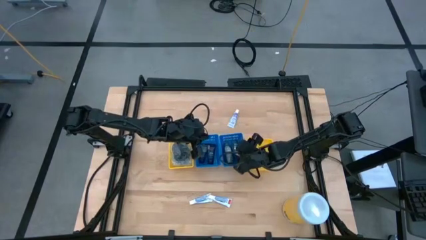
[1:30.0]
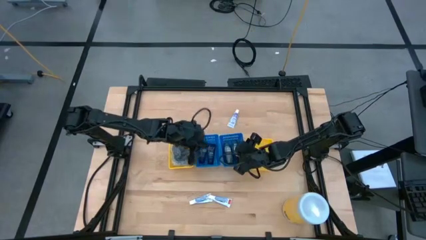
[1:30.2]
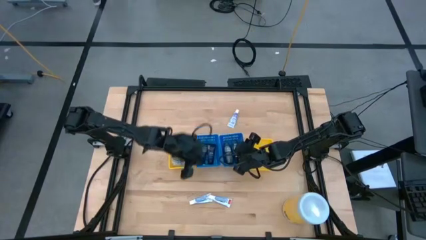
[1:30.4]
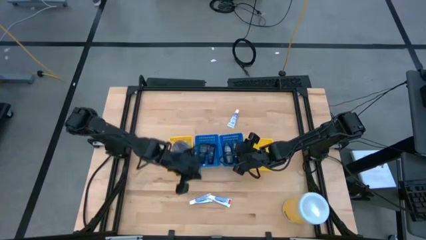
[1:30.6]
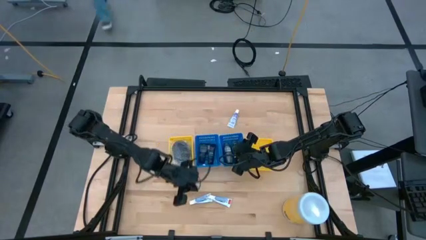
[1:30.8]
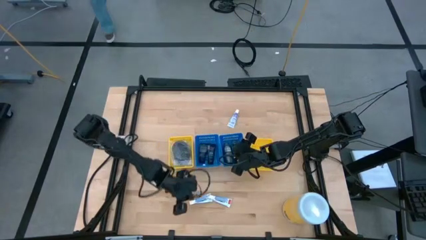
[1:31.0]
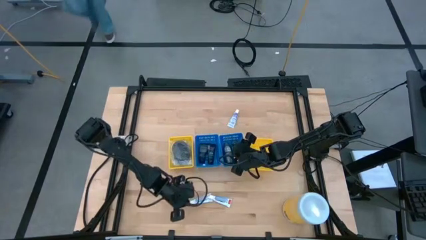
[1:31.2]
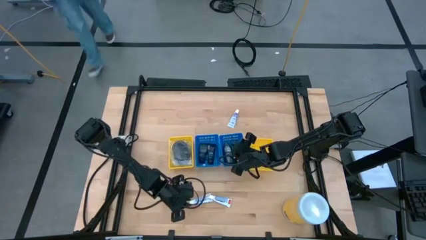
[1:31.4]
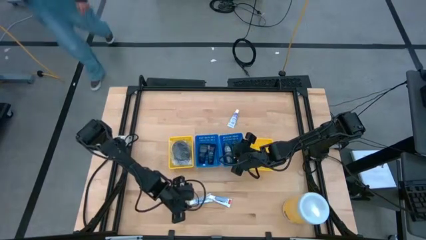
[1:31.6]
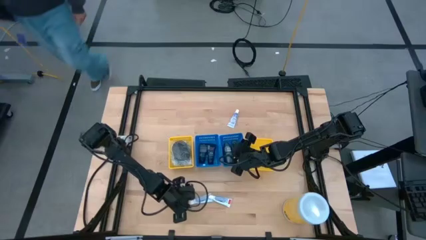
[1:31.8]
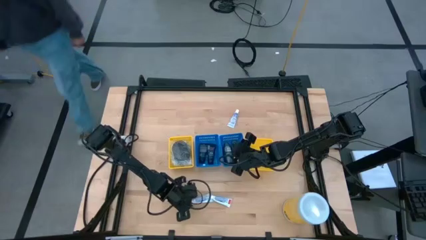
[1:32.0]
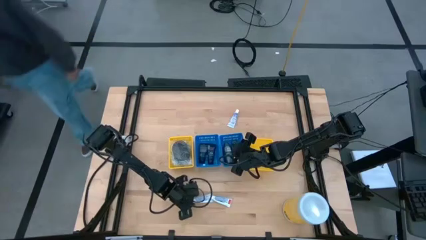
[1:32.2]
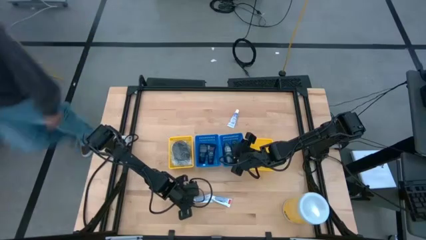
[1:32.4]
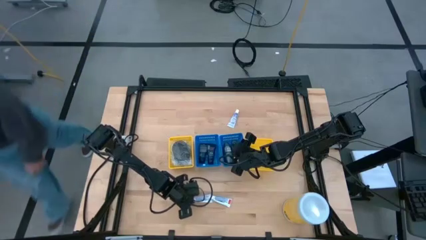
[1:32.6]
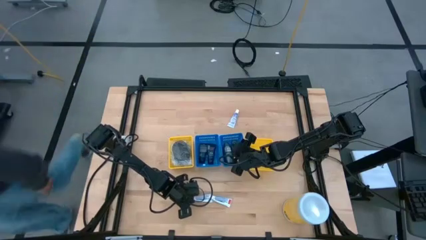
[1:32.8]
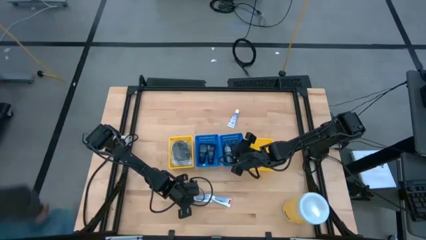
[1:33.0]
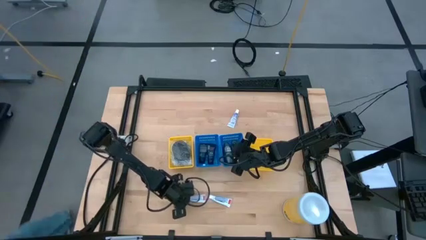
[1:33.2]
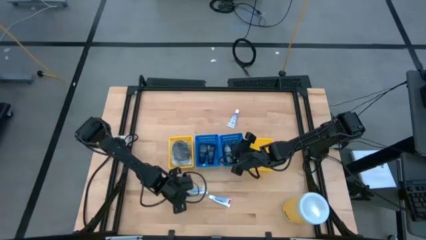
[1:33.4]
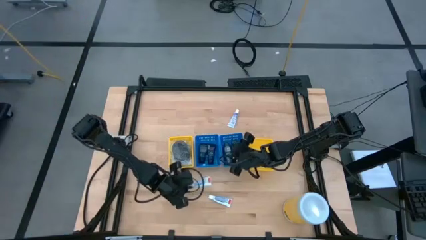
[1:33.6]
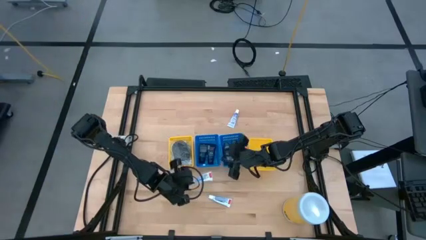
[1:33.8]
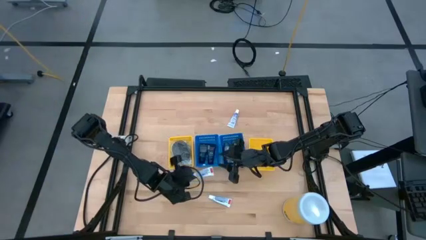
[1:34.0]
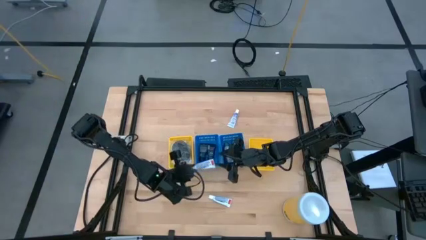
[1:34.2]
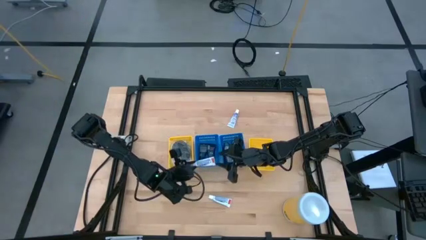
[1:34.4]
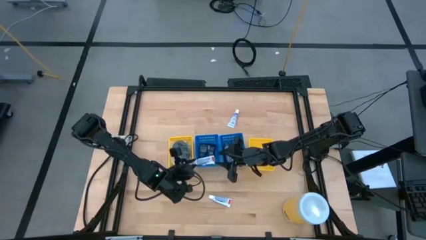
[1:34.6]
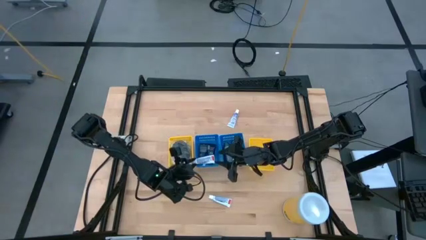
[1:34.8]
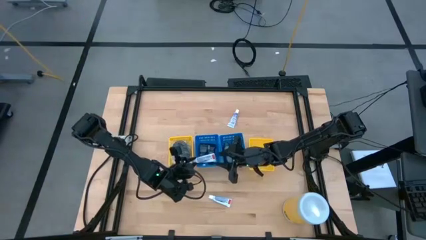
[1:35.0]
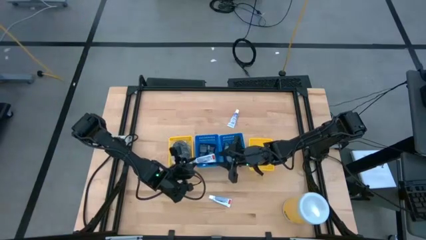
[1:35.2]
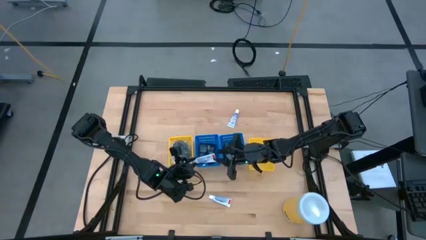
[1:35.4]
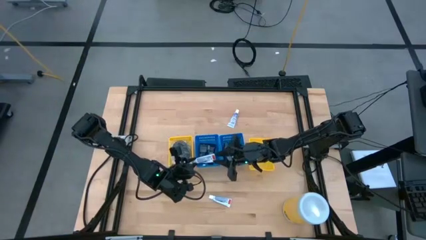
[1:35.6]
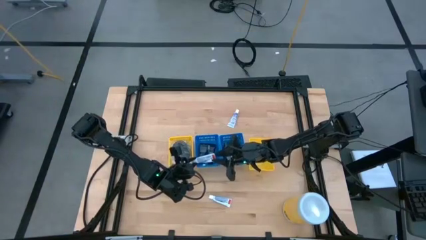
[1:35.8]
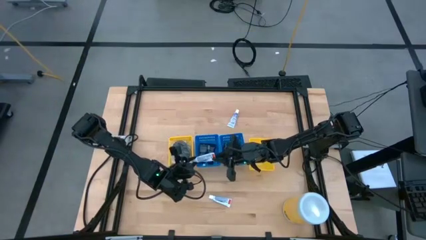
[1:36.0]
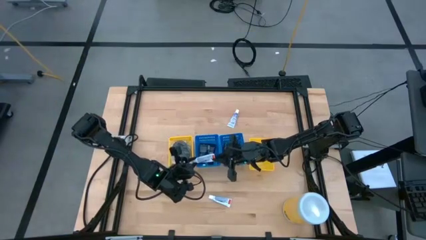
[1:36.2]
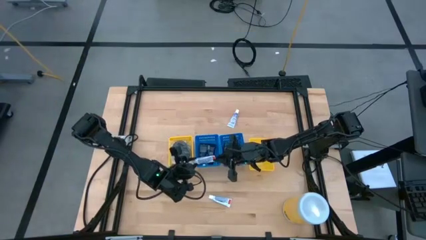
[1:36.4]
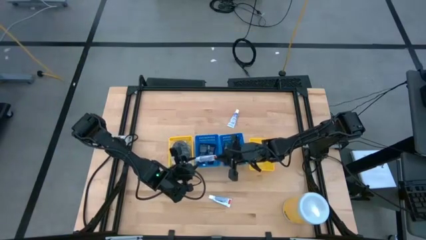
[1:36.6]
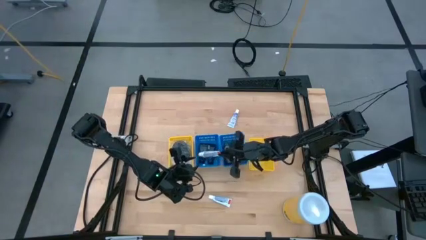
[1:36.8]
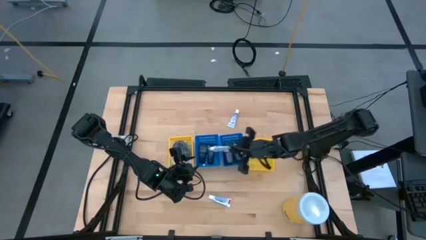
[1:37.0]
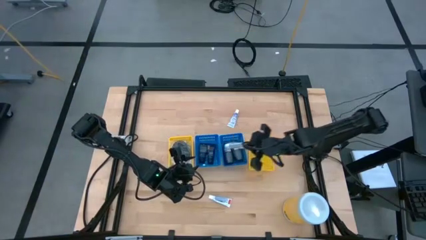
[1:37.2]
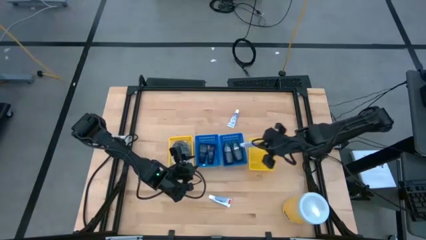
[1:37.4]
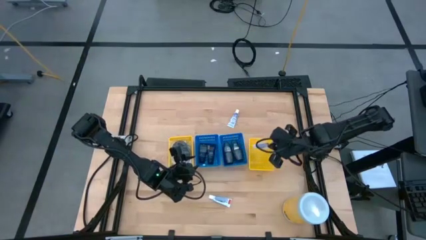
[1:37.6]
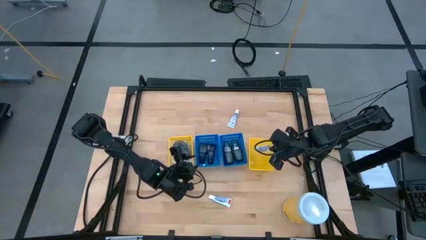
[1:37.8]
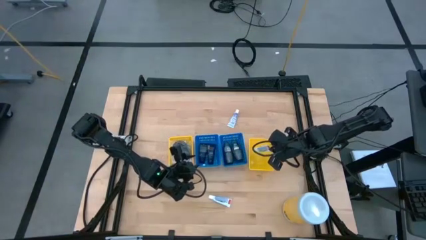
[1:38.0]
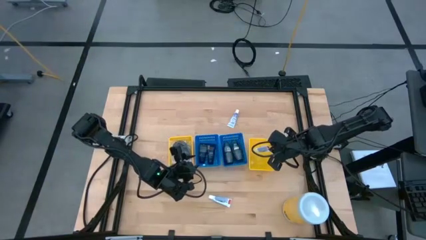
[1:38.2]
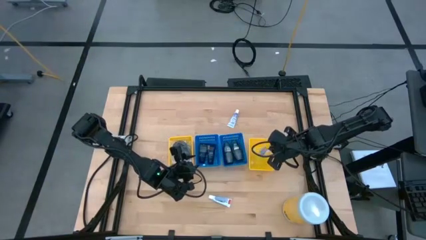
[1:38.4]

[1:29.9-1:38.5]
Task: Pick & Place Travel size toiletries
Put the white toothpaste into the right yellow bin

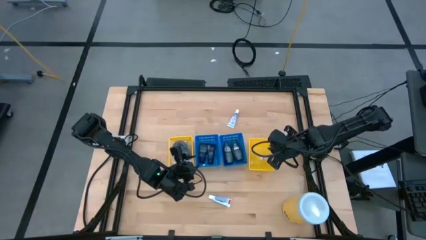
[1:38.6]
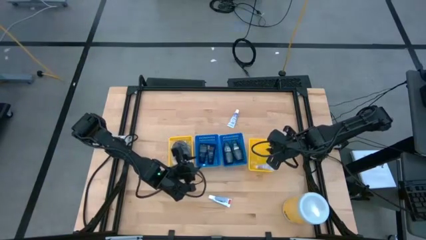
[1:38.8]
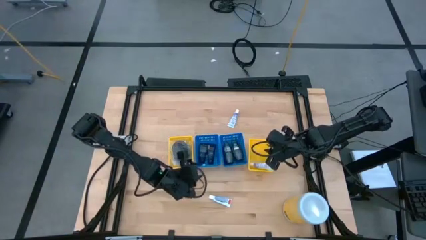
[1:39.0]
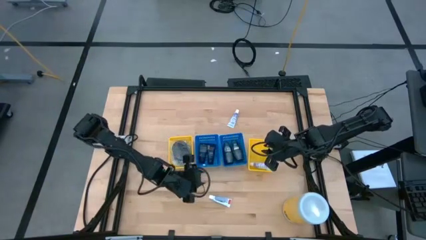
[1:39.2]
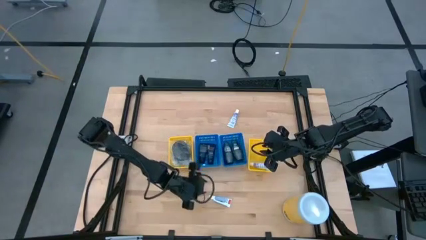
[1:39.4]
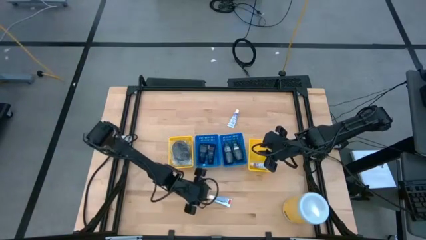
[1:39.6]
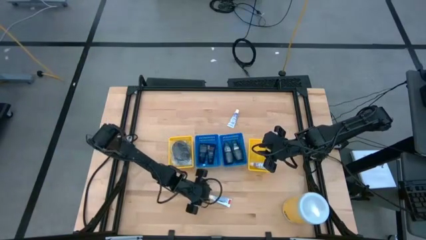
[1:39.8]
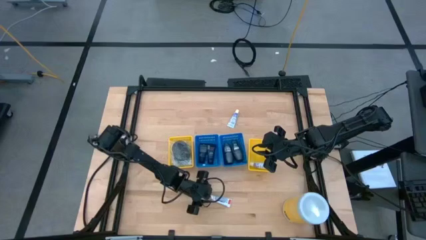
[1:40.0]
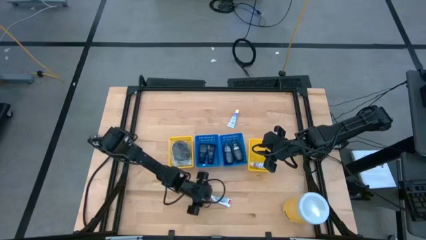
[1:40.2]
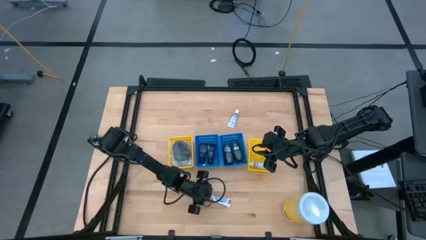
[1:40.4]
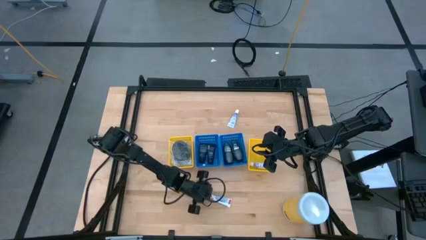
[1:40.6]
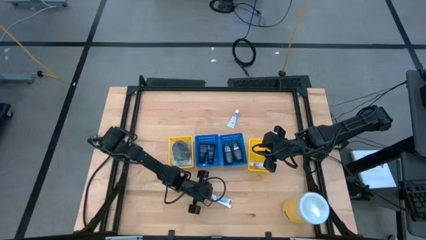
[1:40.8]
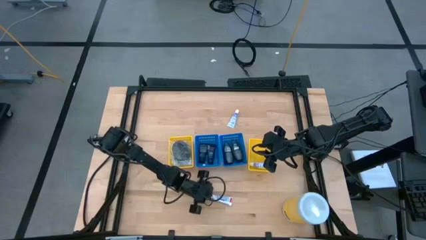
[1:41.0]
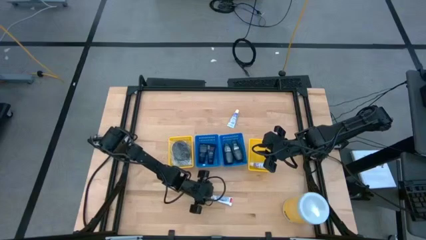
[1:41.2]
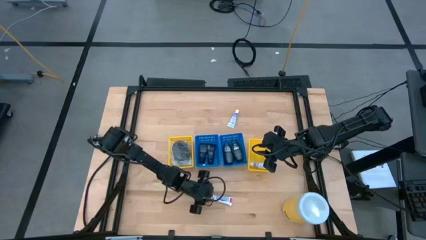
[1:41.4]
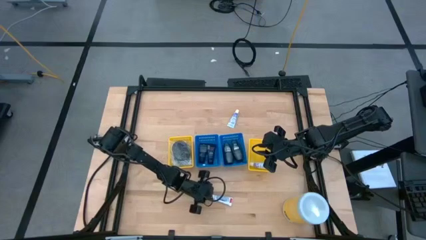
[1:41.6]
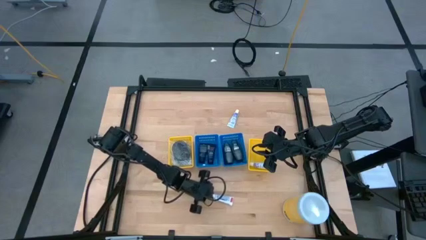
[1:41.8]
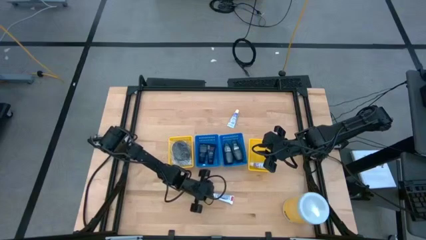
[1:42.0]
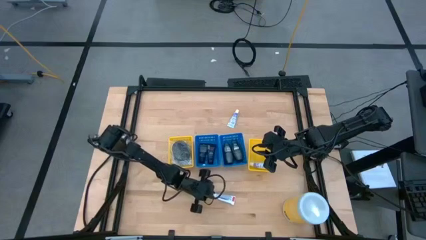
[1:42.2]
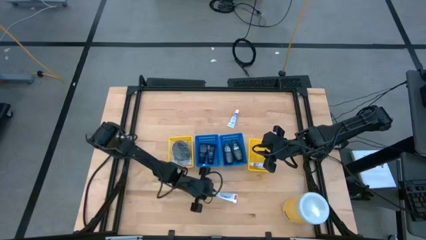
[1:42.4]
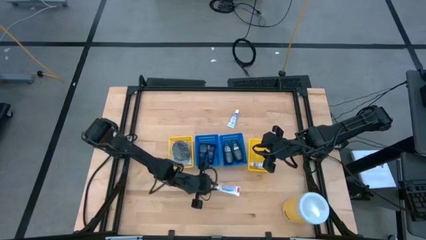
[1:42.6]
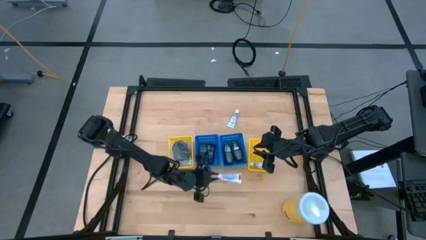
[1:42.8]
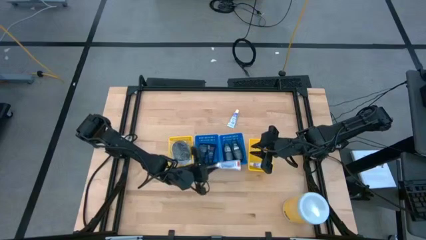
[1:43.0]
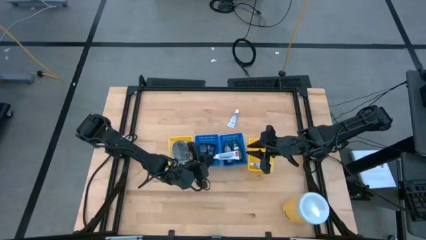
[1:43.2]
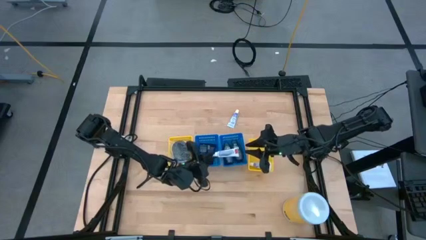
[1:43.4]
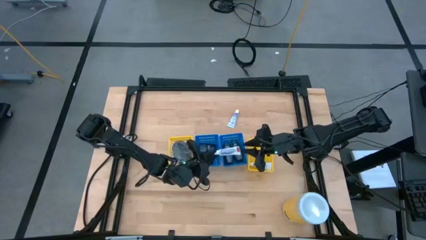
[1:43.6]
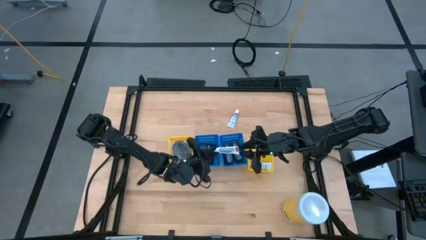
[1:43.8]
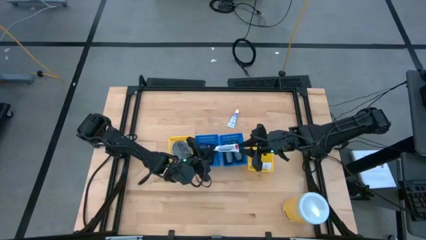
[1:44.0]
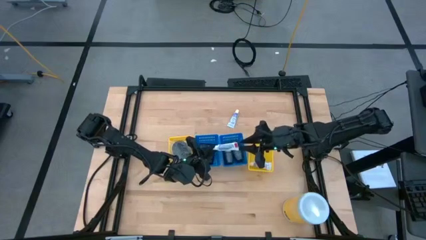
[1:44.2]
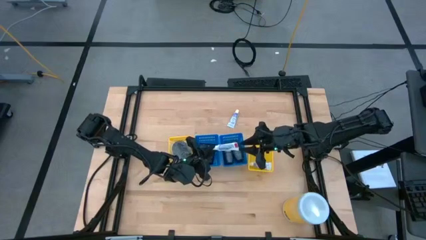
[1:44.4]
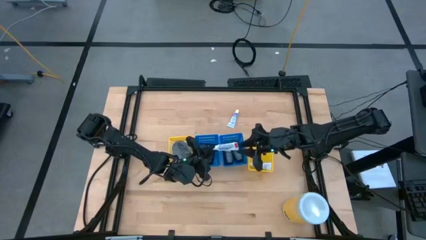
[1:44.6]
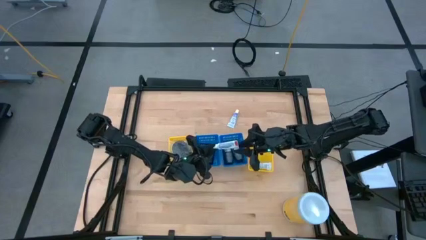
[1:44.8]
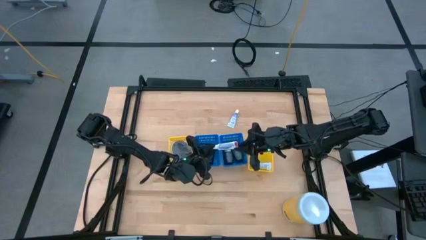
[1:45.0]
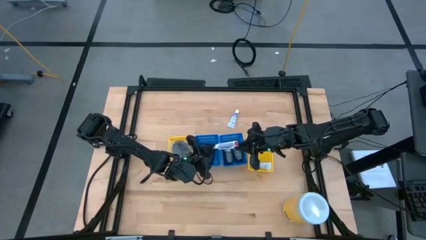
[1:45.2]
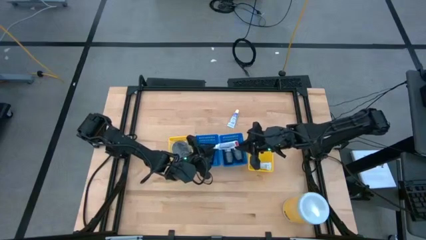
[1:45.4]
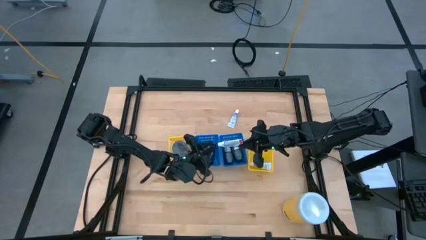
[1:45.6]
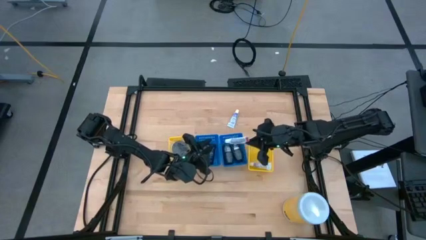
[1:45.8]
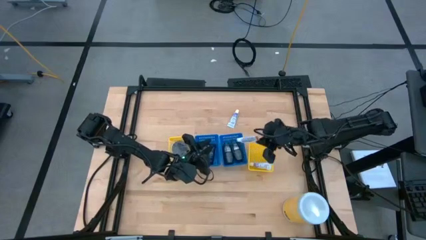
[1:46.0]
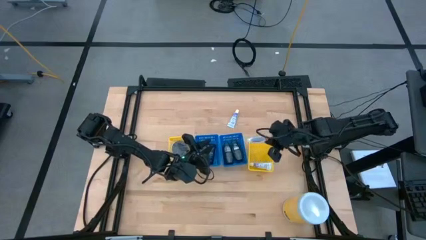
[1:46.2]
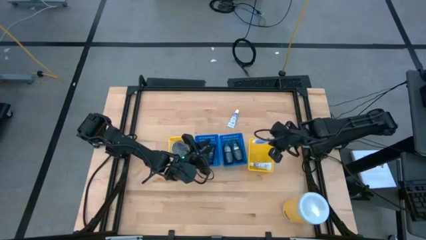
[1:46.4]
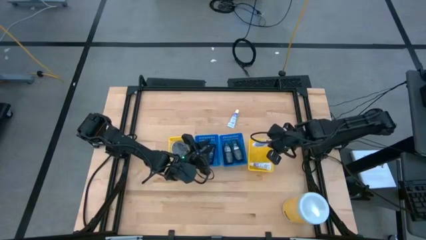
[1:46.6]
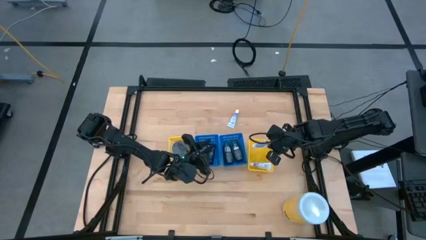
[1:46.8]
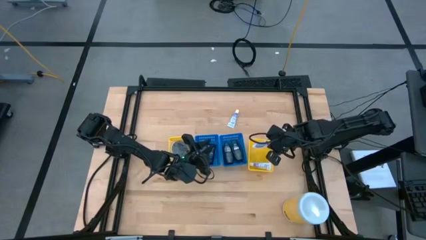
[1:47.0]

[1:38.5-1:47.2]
Put the white toothpaste into the right yellow bin
